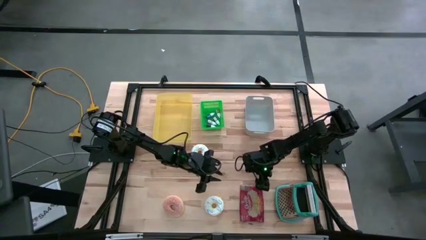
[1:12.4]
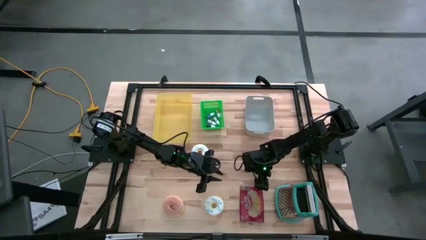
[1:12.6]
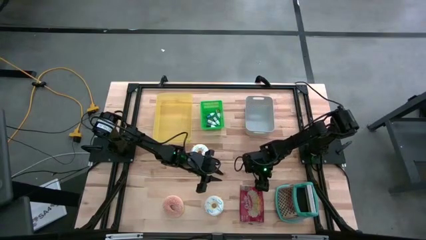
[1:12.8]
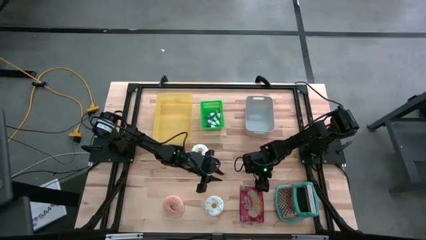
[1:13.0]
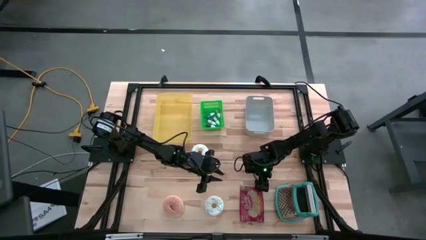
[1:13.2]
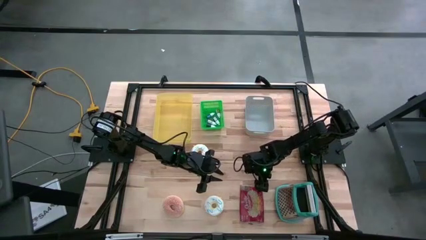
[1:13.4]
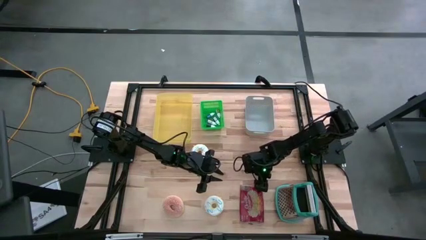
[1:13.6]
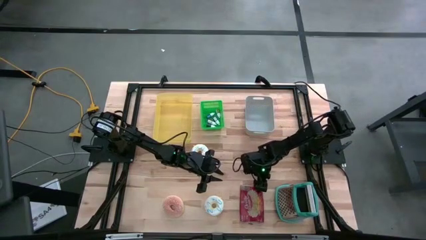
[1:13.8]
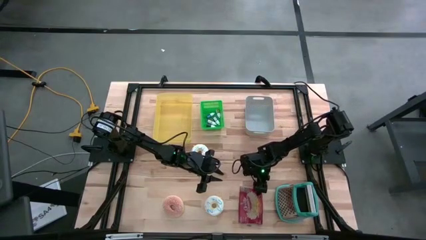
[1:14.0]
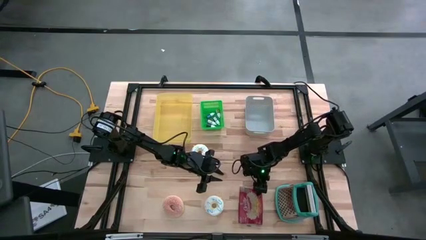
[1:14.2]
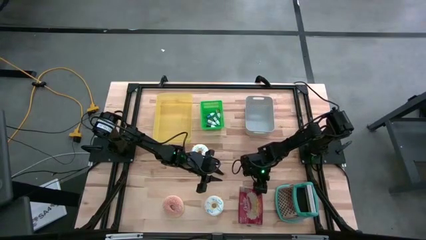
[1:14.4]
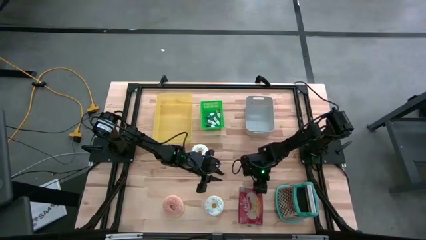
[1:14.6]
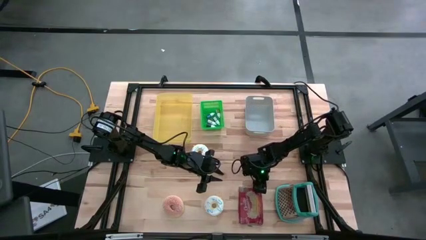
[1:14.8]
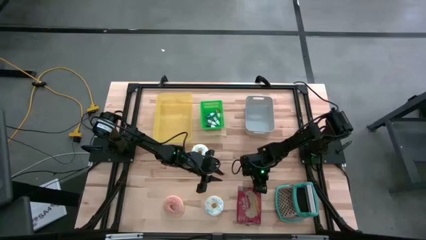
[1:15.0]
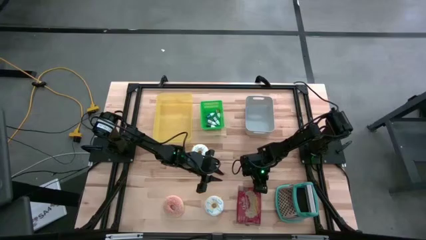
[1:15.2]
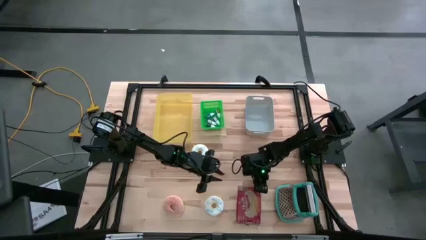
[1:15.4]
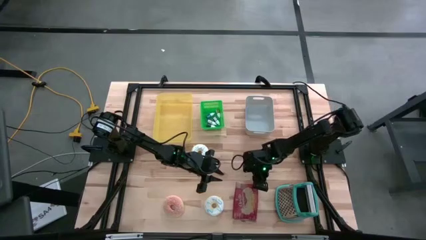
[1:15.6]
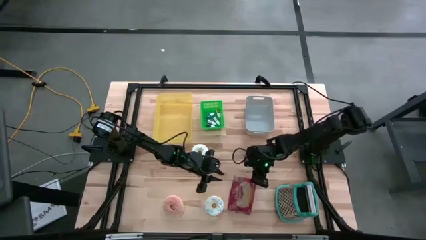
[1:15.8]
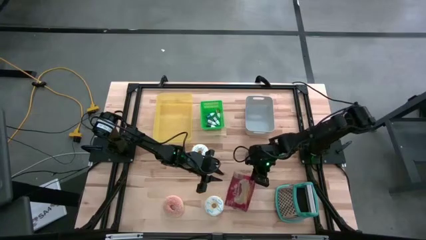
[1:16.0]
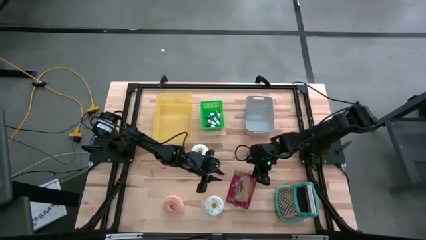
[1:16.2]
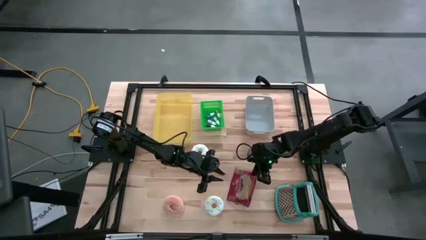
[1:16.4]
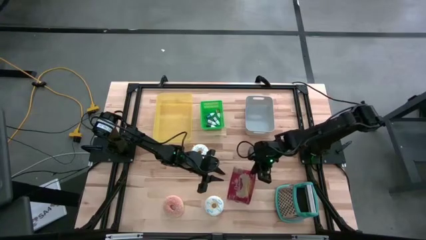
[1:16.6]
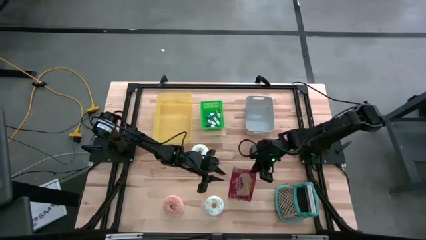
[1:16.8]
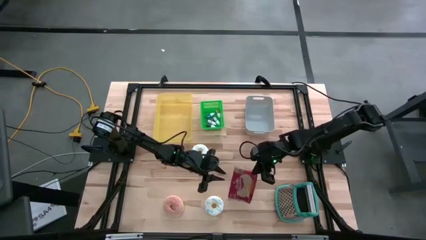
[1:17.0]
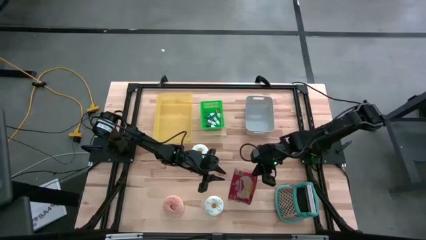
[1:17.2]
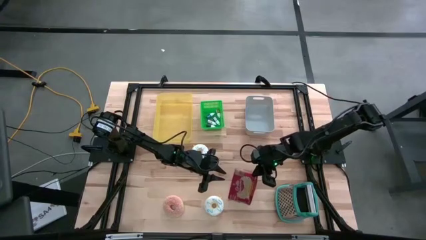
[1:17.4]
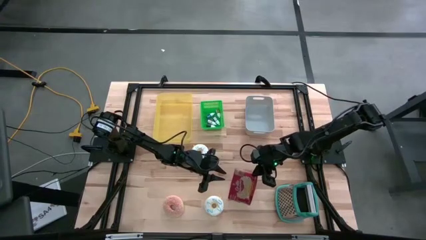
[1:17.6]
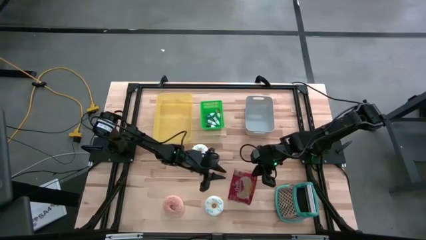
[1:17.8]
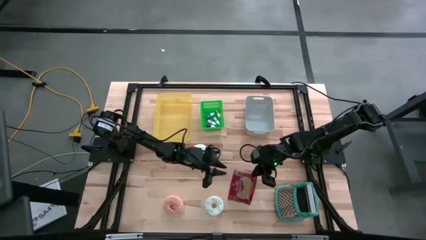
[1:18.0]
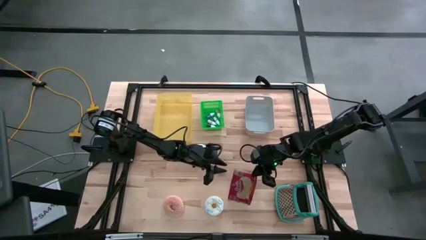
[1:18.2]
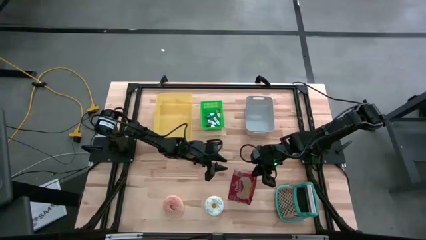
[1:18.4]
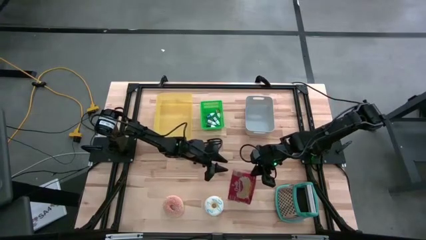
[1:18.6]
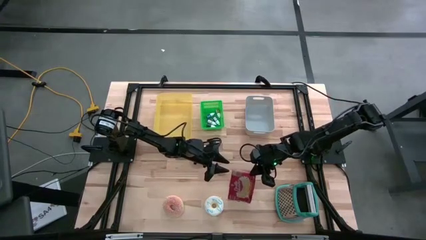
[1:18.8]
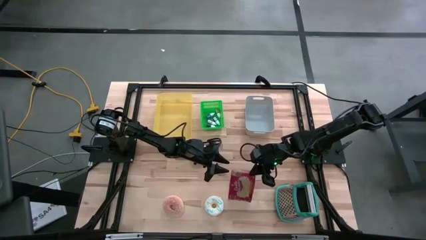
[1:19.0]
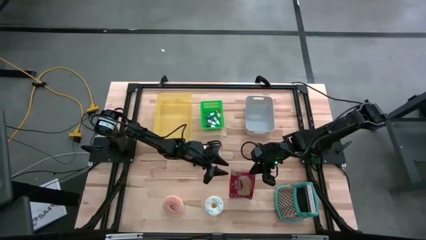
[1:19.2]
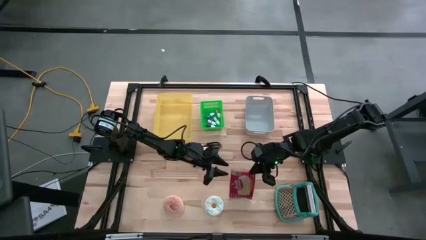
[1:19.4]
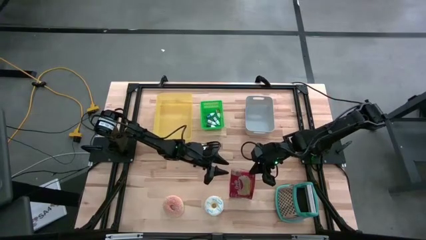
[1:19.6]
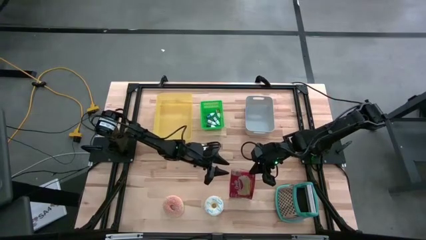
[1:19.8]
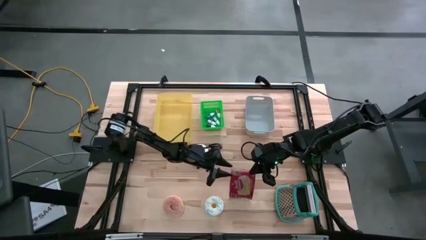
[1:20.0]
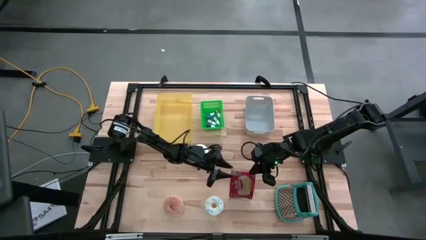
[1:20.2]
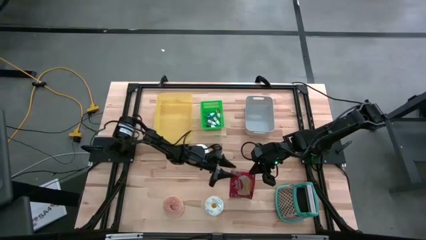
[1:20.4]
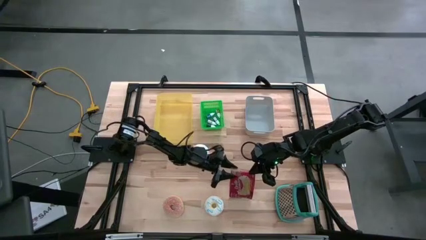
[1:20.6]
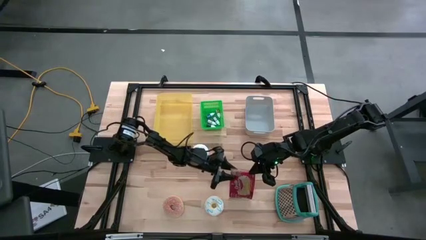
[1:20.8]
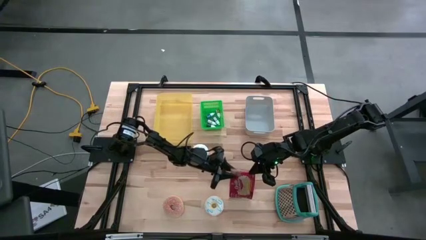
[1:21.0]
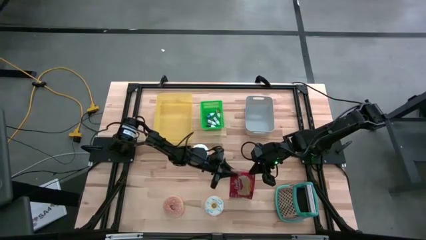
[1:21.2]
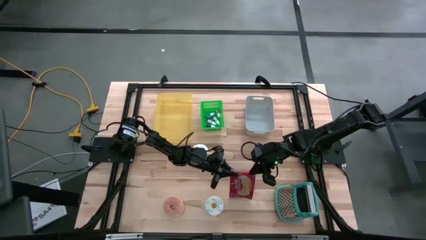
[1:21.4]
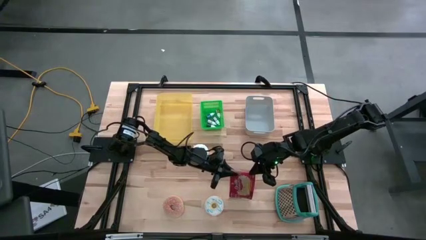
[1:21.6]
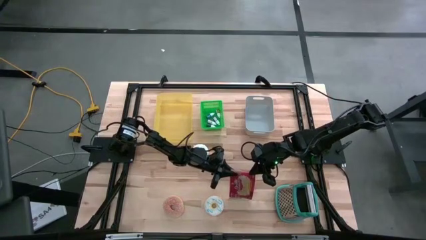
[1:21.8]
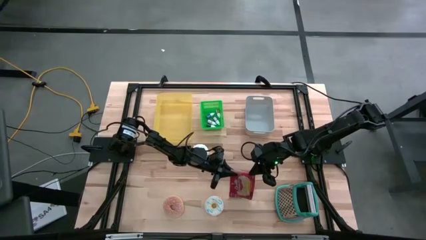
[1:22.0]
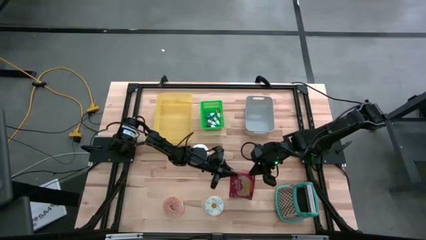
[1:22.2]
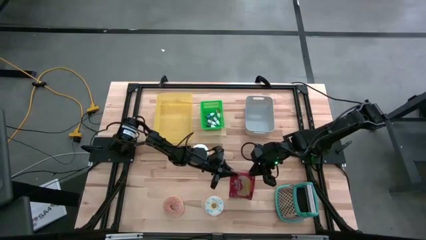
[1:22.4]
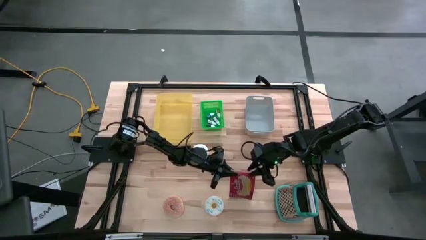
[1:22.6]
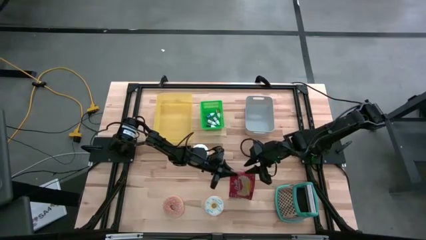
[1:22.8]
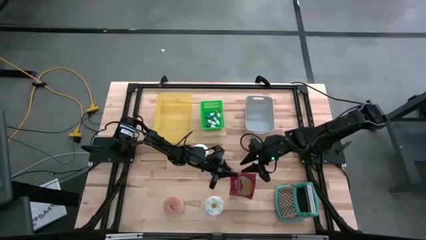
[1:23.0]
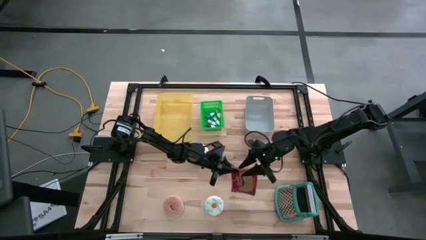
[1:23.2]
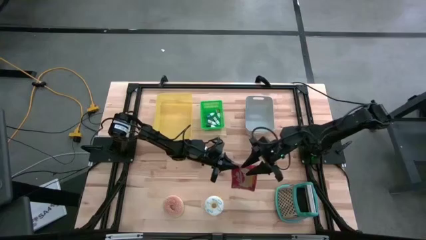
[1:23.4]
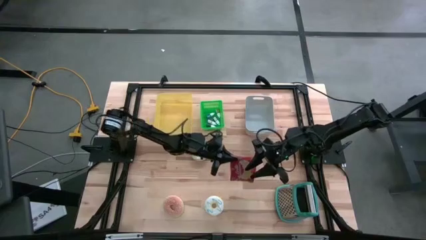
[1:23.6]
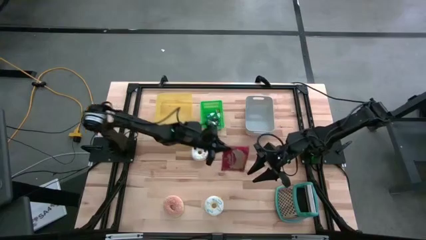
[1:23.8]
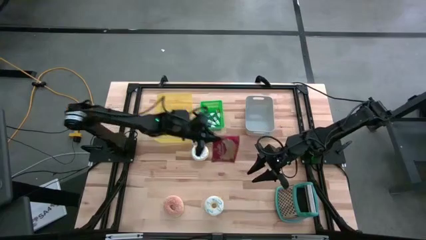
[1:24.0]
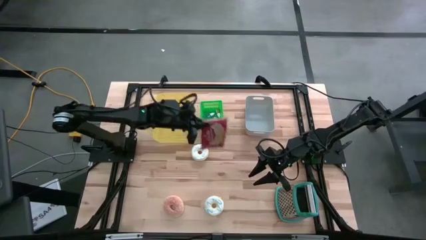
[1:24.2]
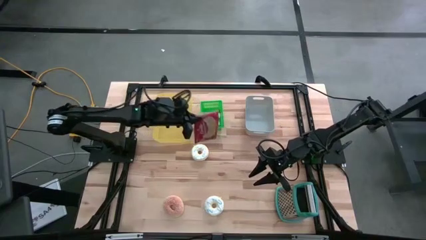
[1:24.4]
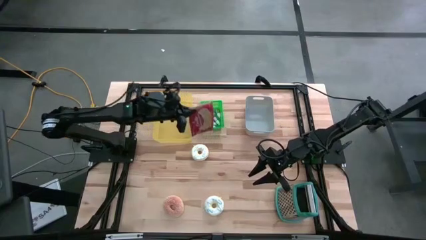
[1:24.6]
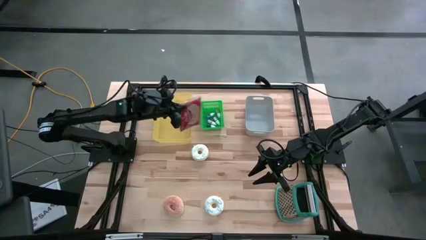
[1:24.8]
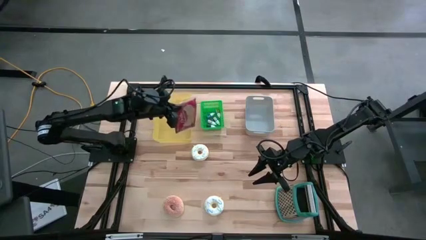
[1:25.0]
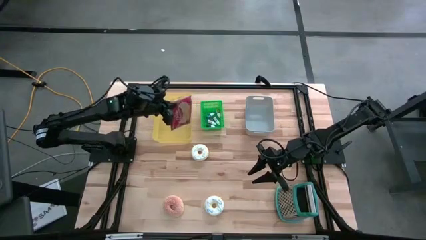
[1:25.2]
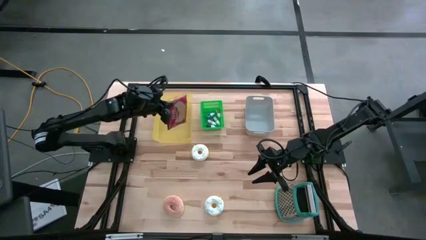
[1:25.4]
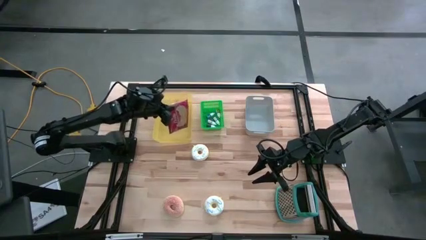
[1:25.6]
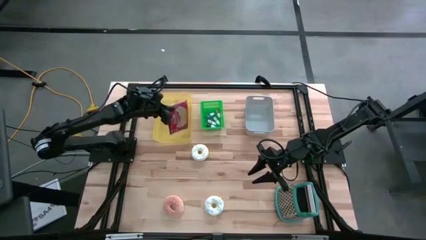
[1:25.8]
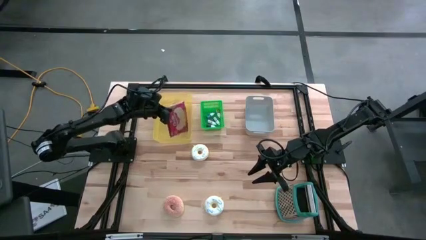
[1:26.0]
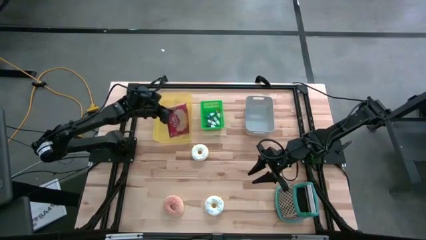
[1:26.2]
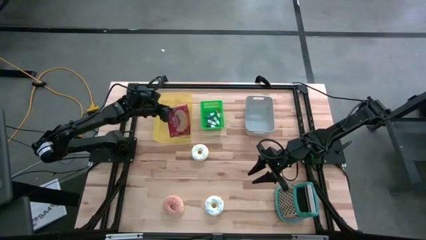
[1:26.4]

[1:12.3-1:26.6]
Put the popcorn bag into the yellow bin
